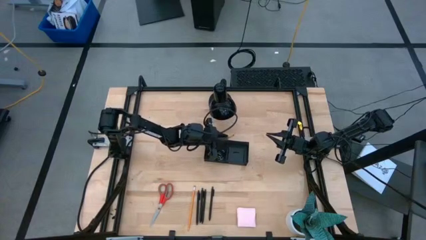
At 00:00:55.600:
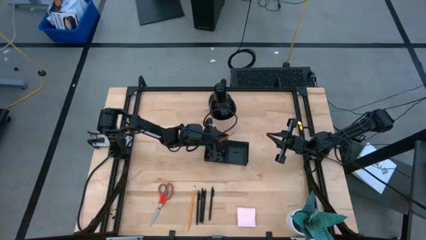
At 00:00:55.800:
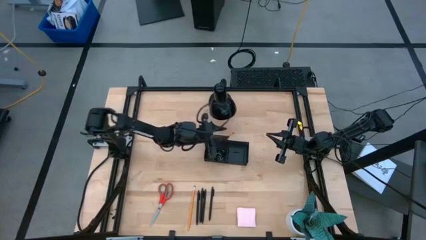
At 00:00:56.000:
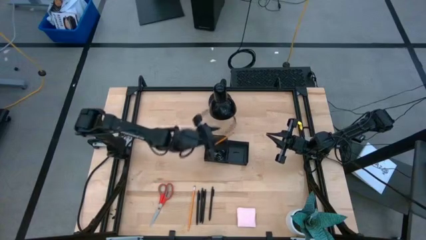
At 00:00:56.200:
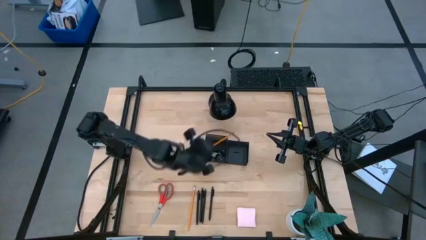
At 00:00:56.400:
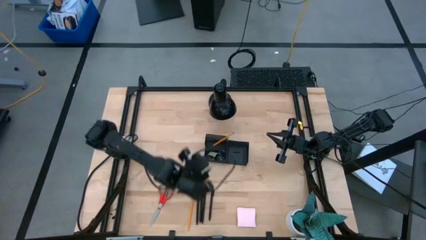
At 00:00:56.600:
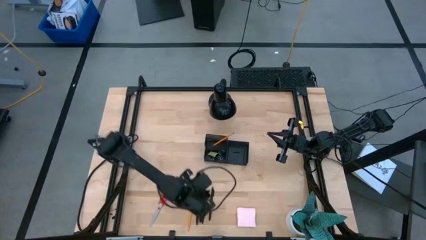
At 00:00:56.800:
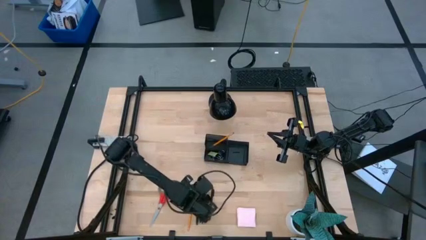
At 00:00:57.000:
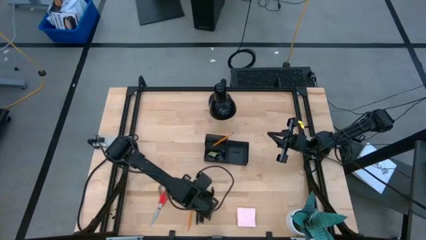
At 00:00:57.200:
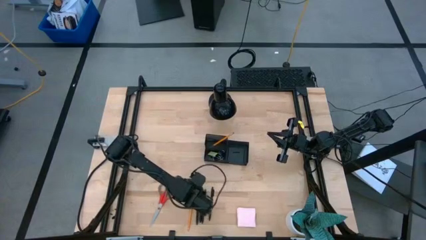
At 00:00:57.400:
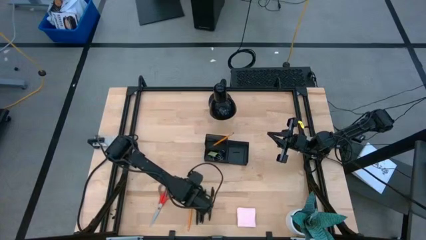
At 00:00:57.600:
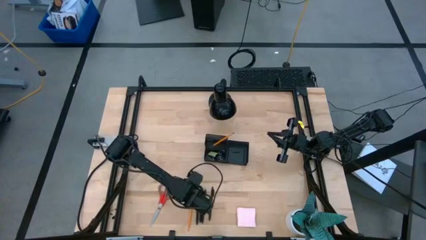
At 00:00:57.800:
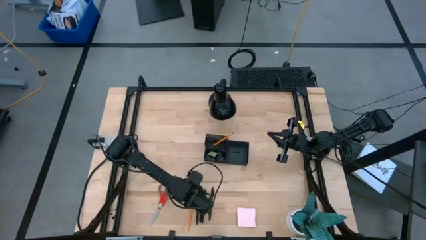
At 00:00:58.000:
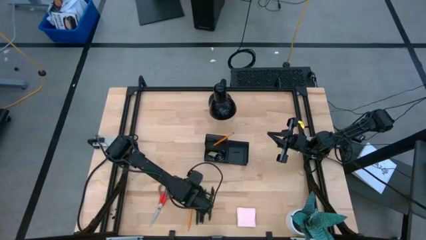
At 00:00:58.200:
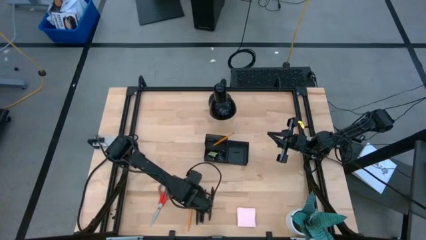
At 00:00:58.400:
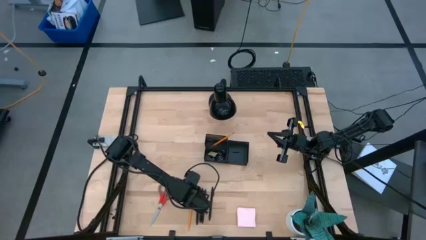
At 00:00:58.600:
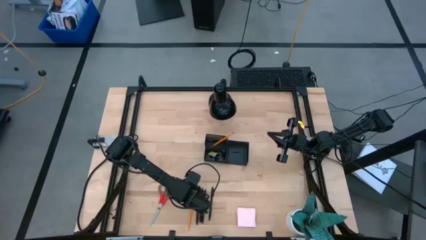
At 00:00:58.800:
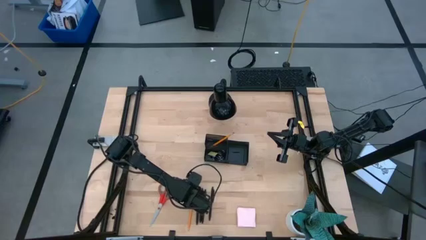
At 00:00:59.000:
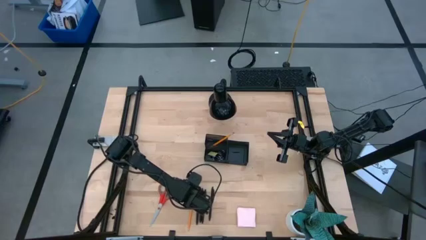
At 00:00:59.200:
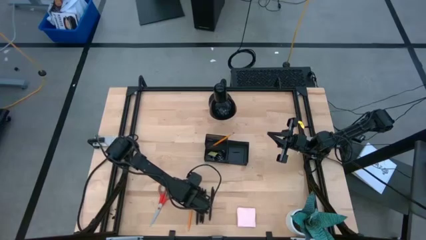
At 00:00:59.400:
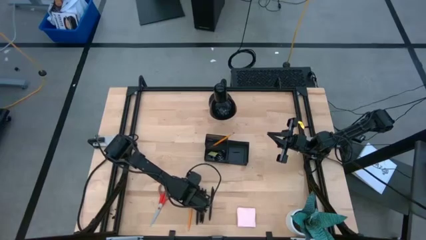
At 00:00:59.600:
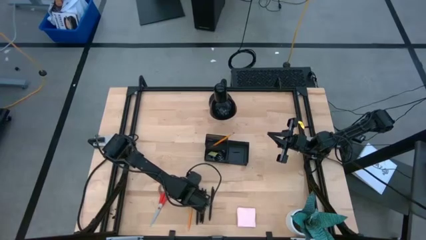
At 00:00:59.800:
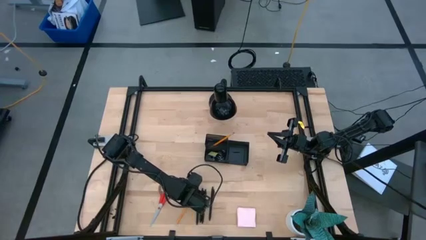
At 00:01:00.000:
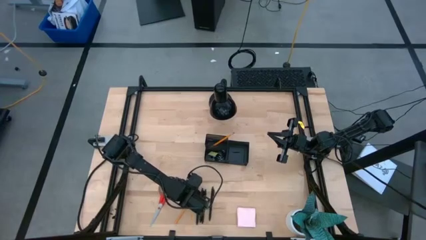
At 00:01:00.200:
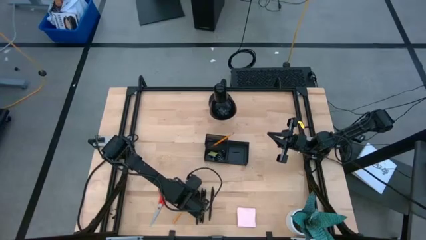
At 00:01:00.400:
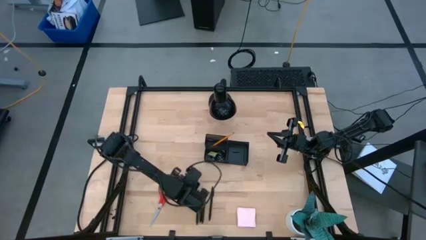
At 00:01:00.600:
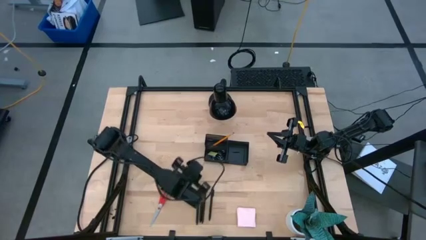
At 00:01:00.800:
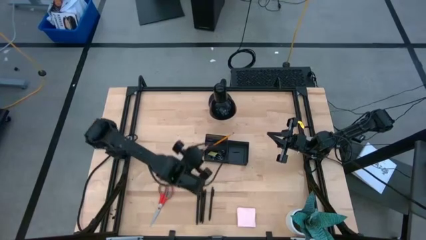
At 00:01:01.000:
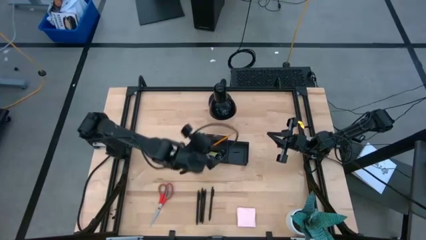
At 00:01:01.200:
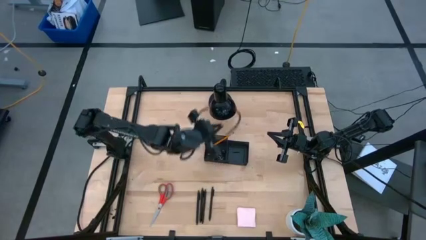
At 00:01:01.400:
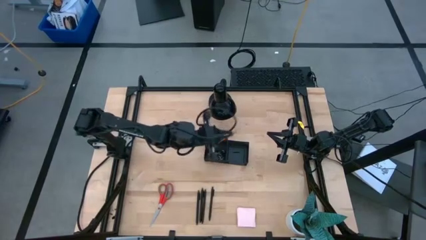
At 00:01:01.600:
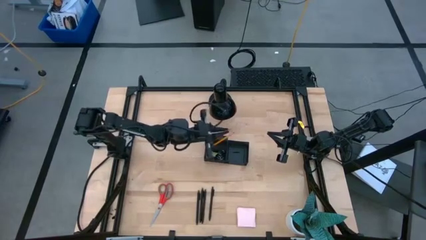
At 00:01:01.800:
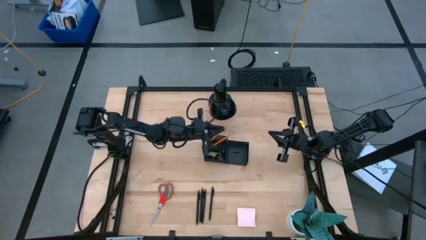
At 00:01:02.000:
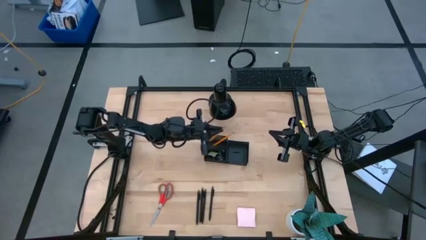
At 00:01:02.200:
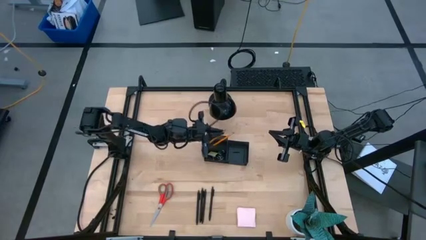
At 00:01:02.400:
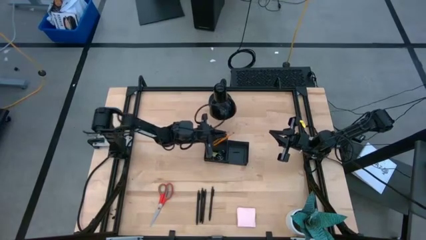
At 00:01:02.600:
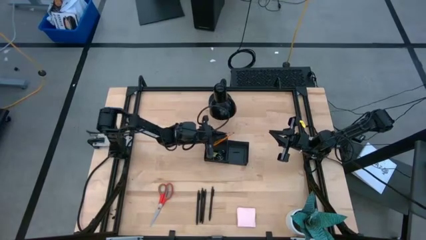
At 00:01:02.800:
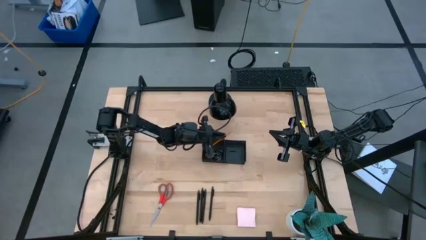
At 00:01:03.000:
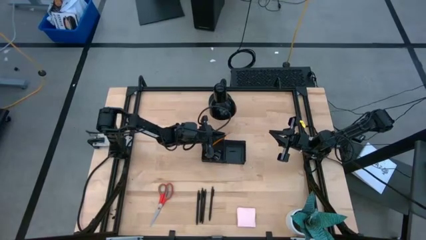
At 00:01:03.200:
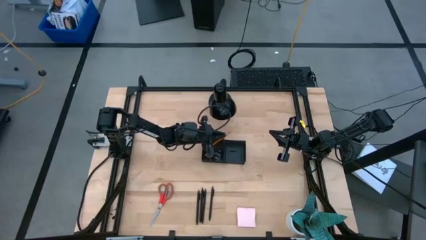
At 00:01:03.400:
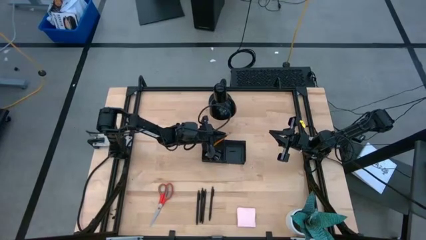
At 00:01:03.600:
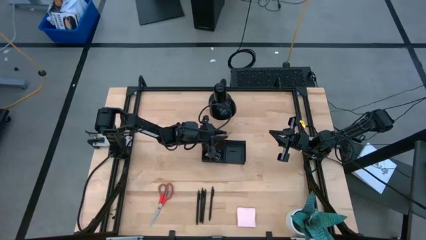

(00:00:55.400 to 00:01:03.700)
Task: Pick and place office supplies into organizer
Put the yellow pencil into the black desk organizer

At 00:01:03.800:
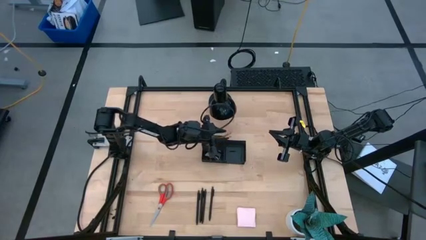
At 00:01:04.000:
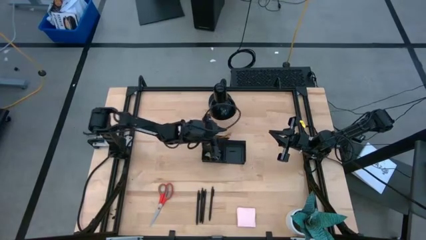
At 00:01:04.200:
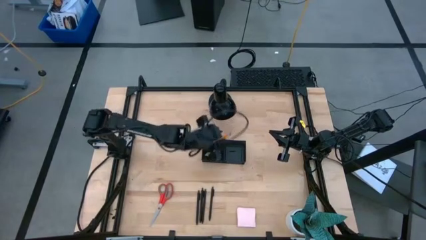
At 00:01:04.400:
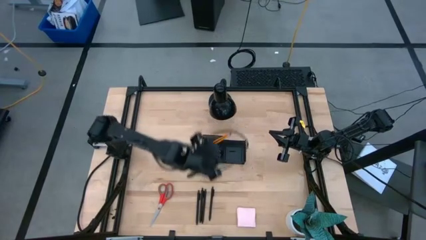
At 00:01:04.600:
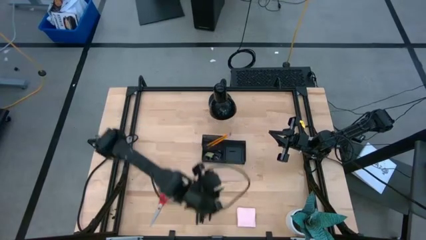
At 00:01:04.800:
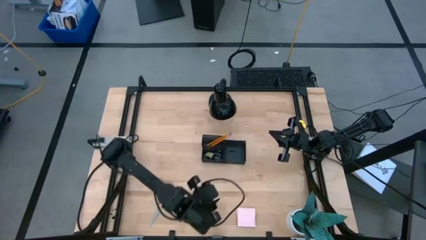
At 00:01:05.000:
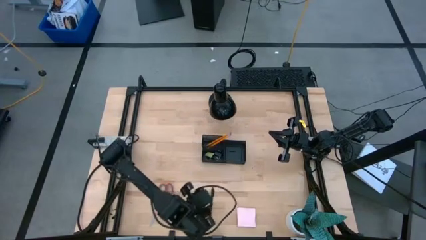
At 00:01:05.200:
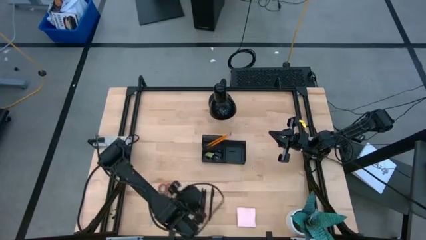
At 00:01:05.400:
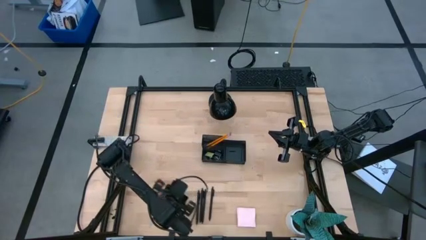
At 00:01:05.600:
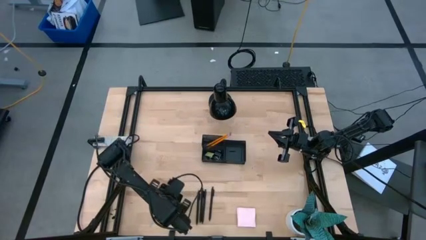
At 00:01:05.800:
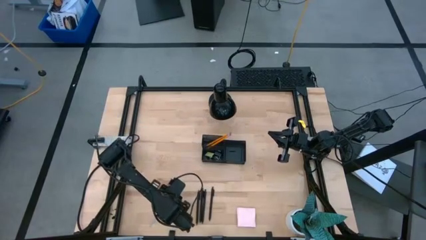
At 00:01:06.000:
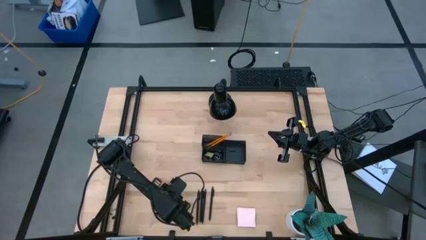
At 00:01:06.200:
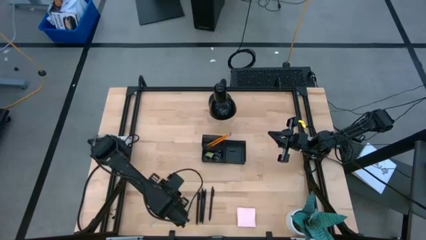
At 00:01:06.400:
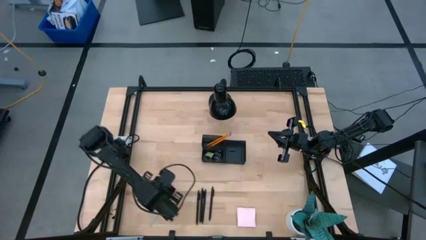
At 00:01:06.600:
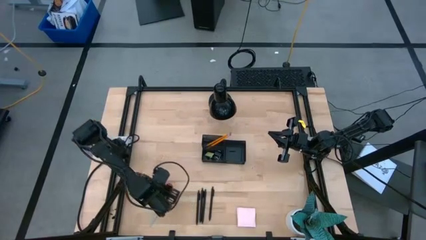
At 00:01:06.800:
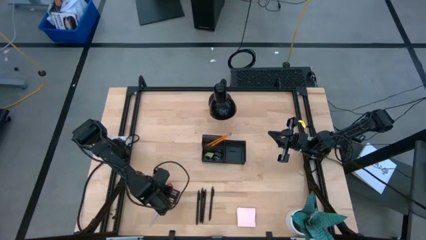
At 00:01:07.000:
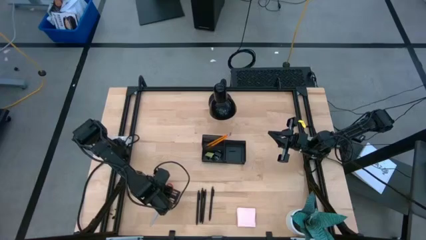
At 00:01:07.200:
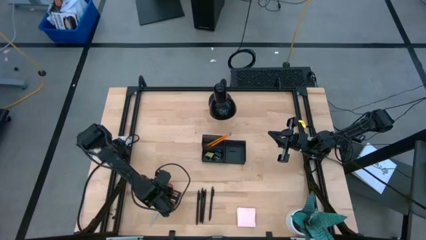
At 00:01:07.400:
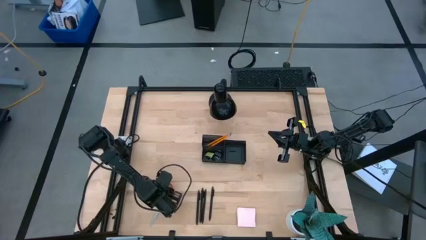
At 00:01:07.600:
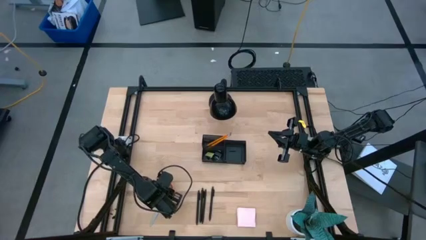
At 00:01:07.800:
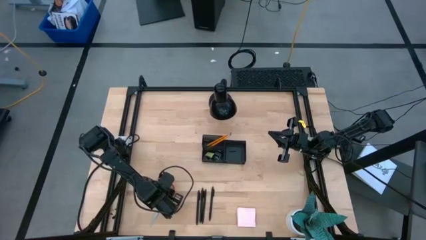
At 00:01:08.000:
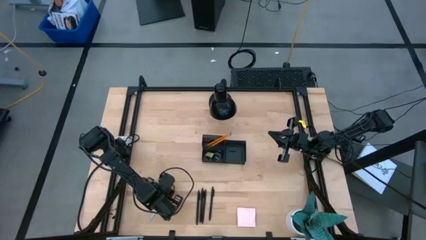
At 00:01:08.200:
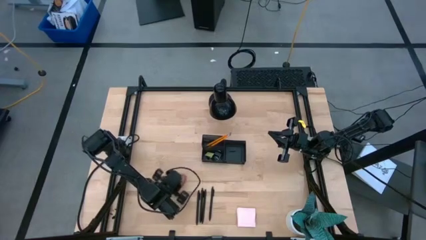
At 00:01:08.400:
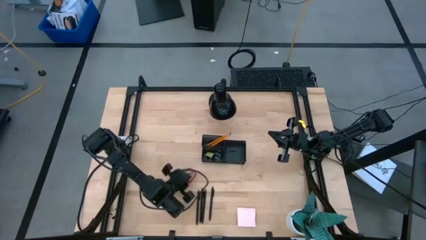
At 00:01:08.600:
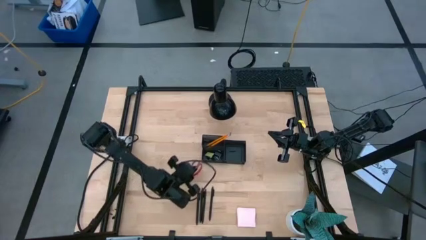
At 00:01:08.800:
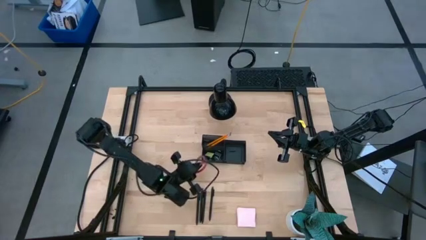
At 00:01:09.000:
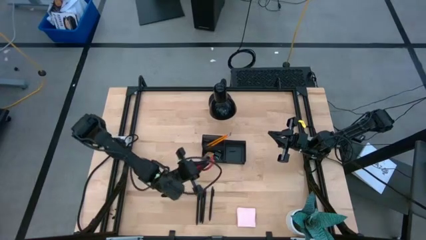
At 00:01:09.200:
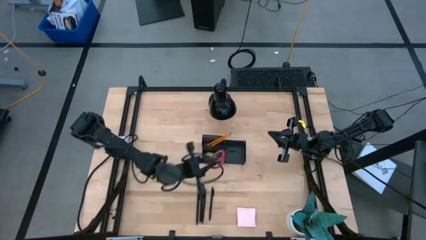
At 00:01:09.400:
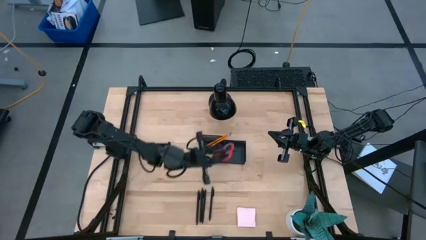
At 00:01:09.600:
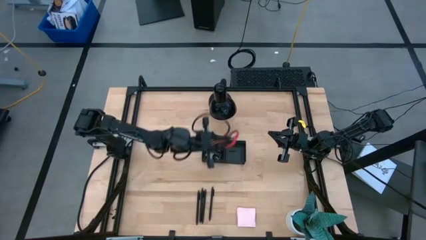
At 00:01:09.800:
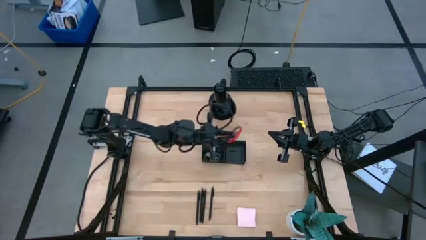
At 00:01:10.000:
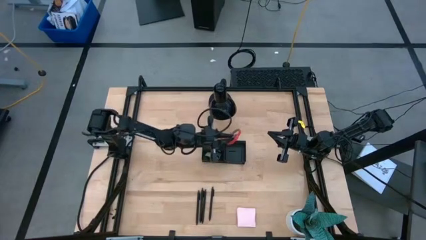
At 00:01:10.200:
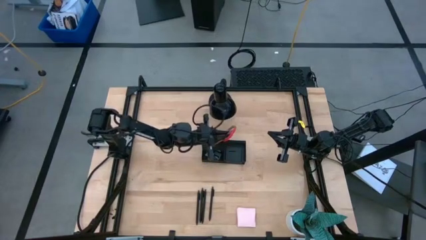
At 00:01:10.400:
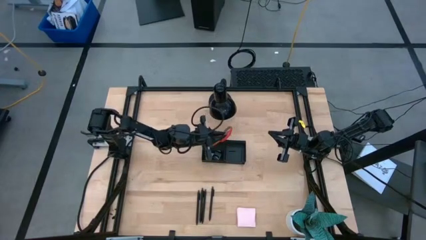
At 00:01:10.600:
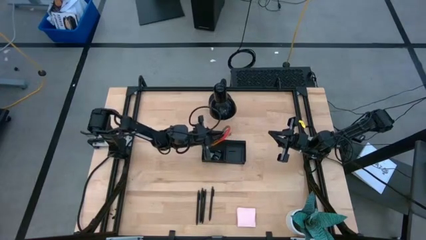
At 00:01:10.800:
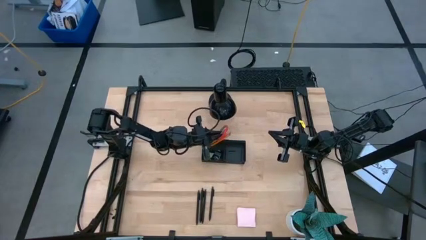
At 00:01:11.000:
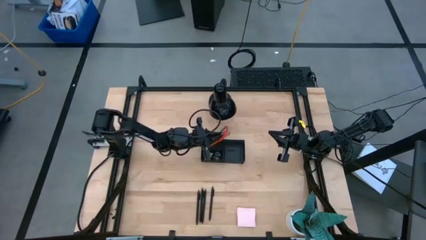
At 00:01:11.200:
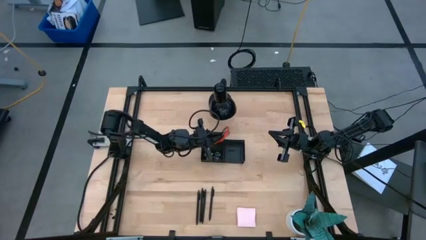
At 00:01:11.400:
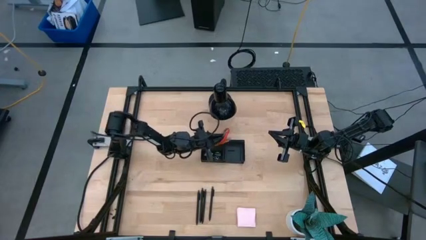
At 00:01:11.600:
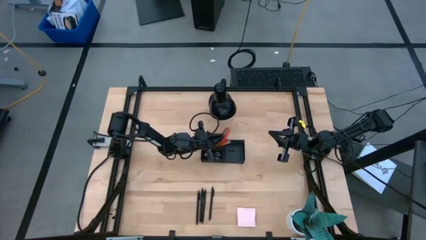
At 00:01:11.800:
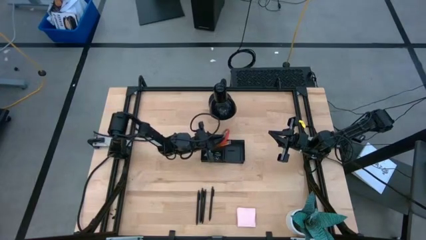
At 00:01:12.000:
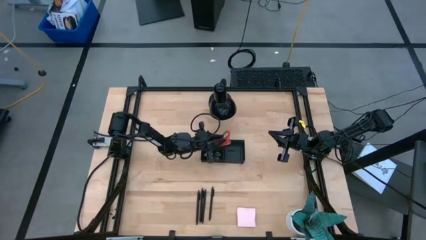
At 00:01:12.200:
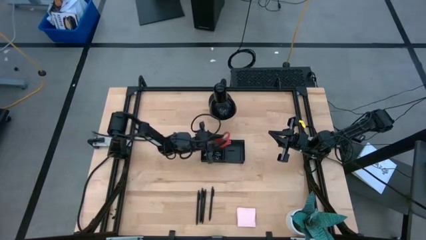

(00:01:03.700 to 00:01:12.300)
Put the orange scissors into the black desk organizer
